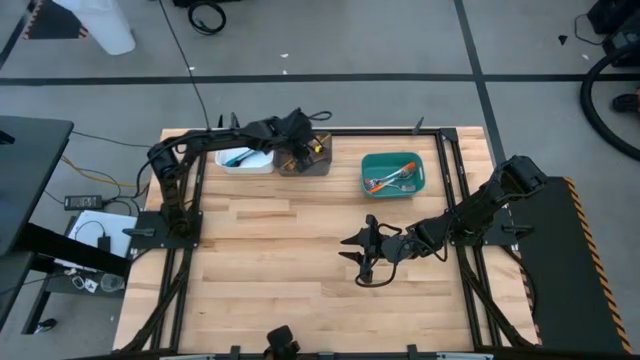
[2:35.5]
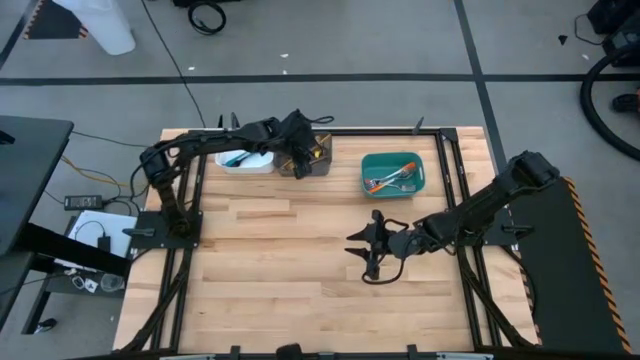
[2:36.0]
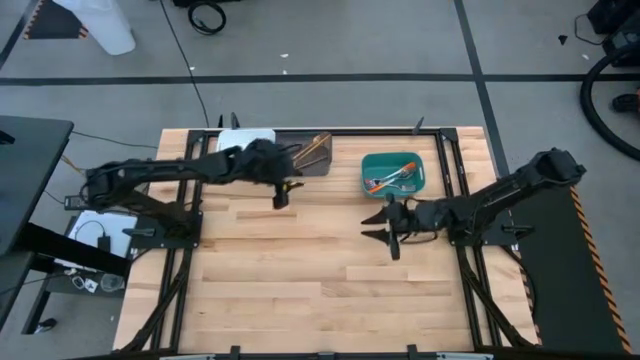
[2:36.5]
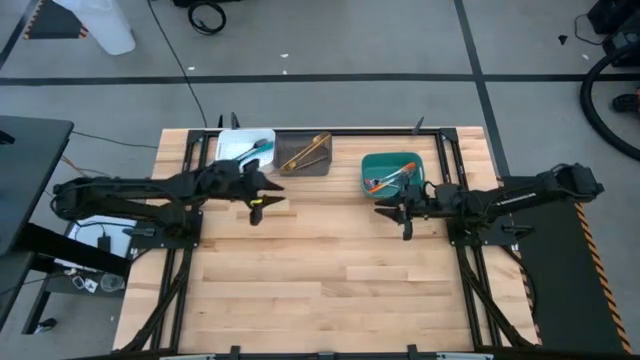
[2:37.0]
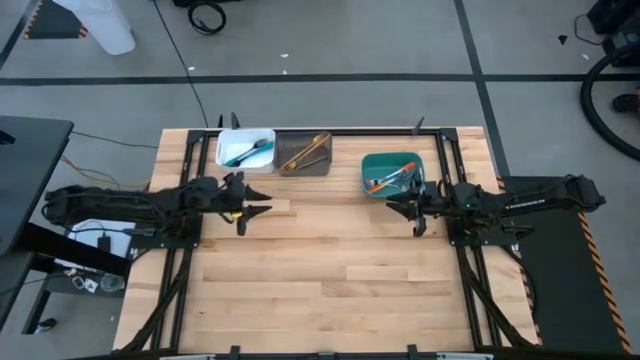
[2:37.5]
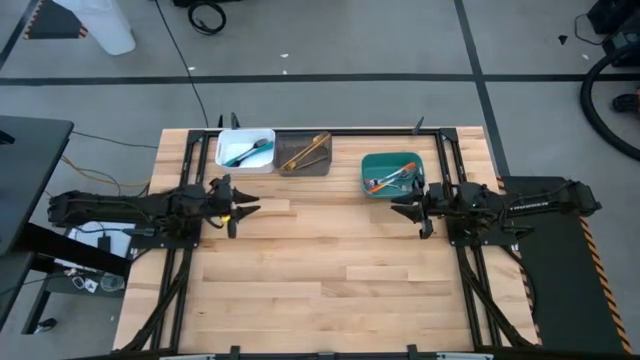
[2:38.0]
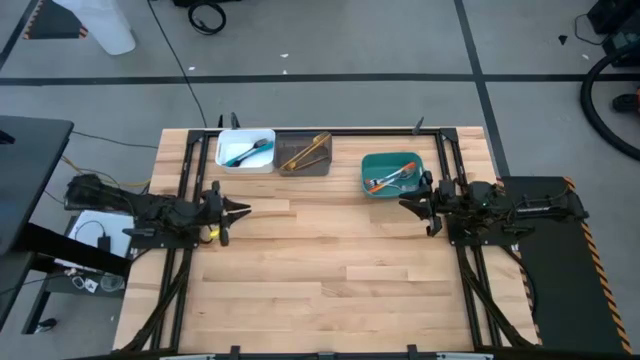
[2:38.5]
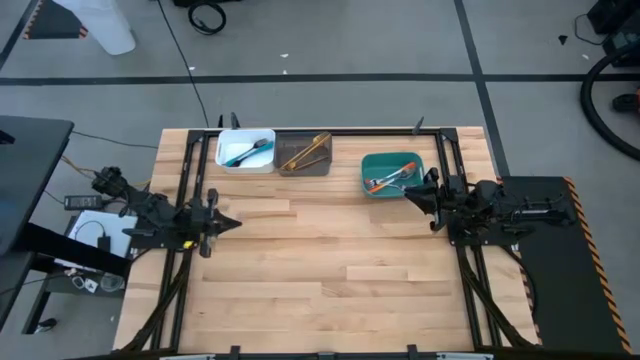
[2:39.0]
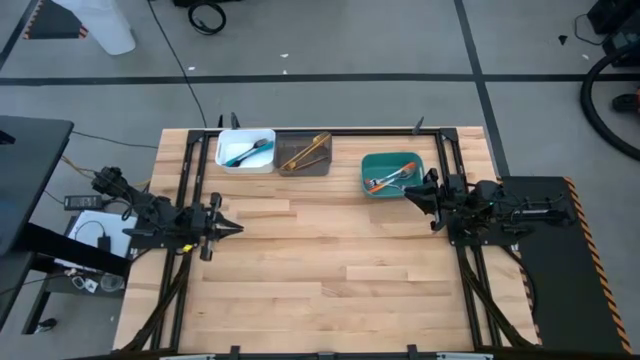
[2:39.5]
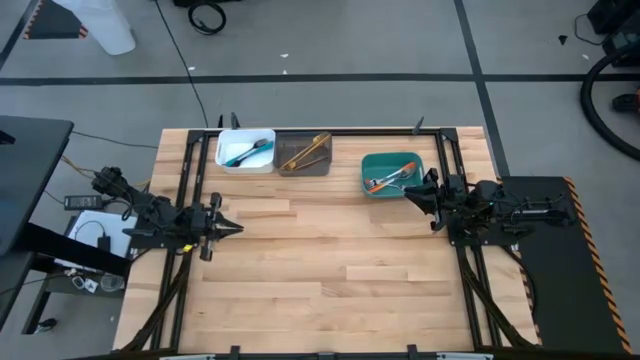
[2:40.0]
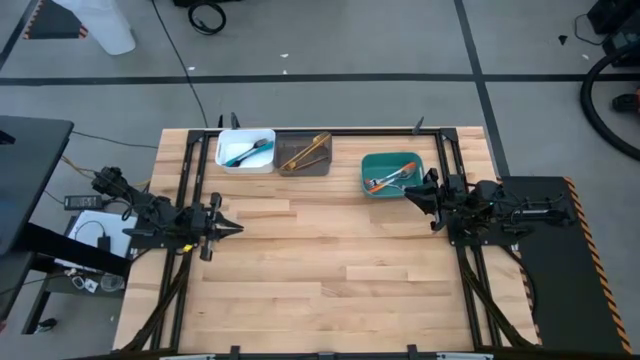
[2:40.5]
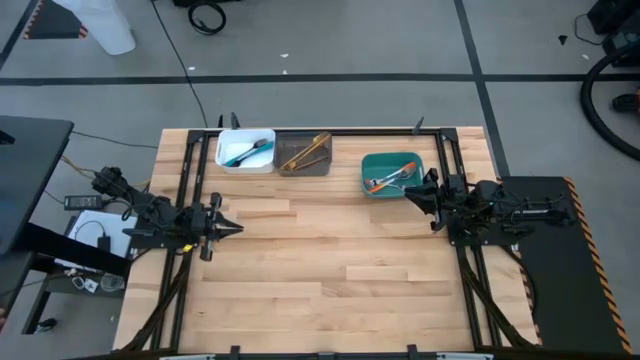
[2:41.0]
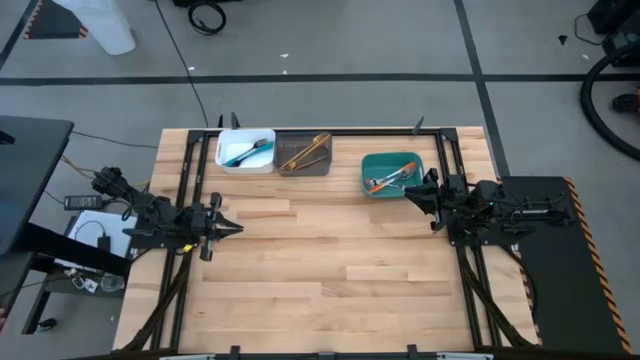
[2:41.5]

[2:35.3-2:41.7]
Task: Sort silverware by color (type)
Return to Home Position

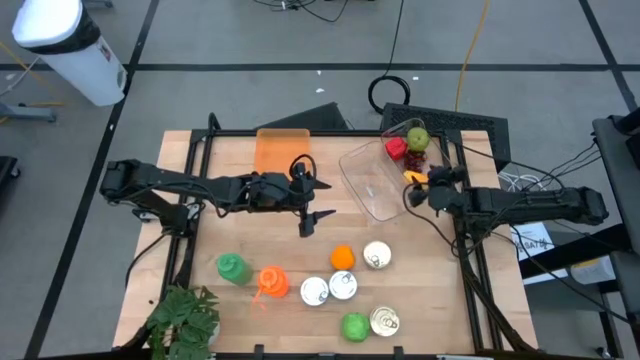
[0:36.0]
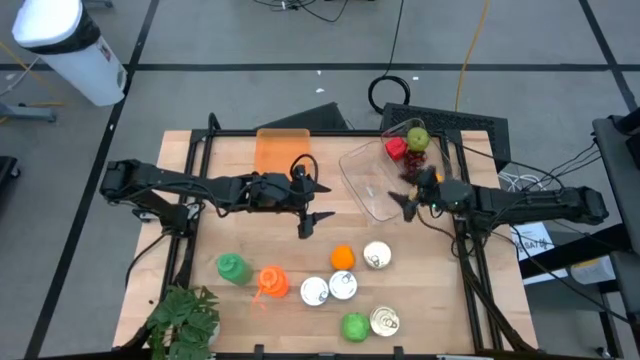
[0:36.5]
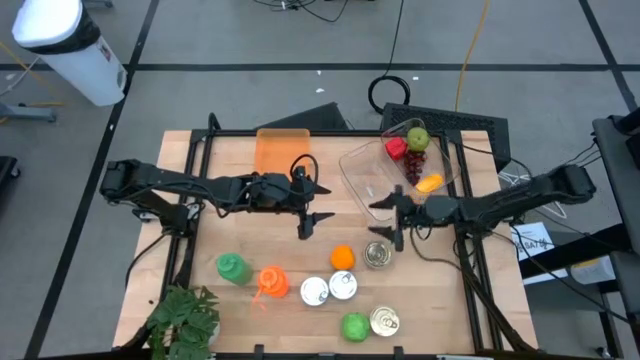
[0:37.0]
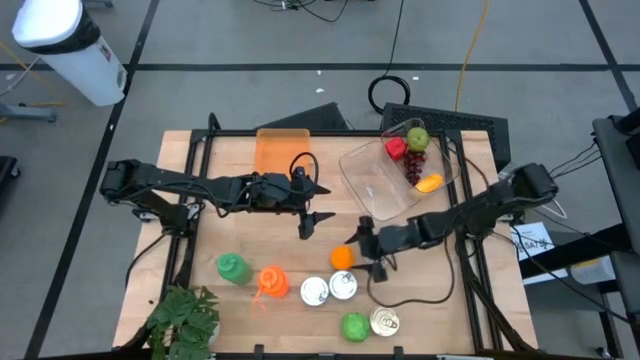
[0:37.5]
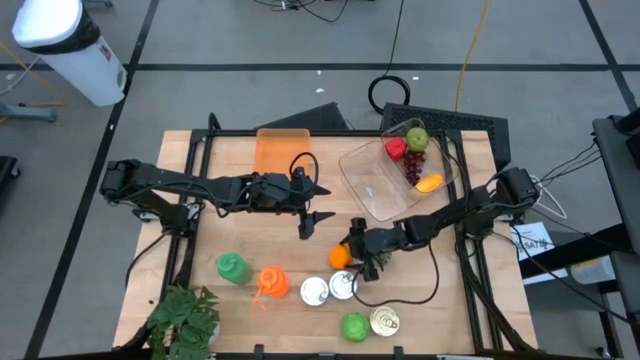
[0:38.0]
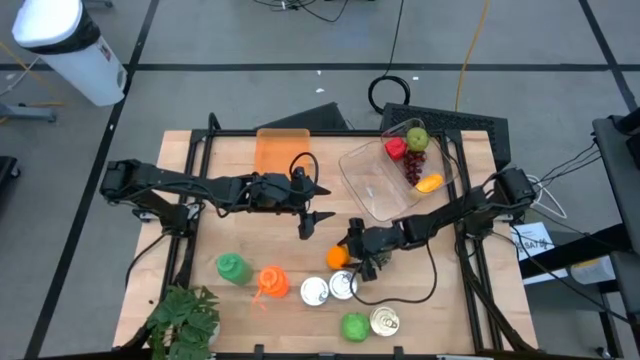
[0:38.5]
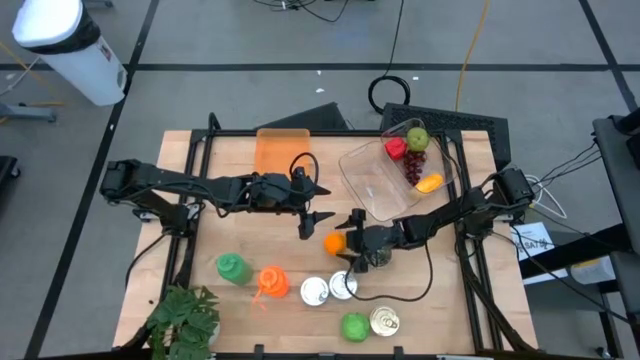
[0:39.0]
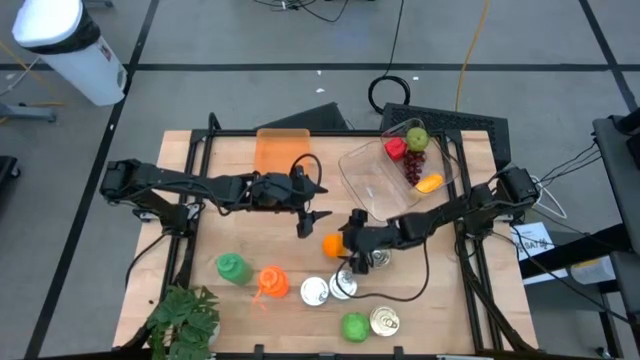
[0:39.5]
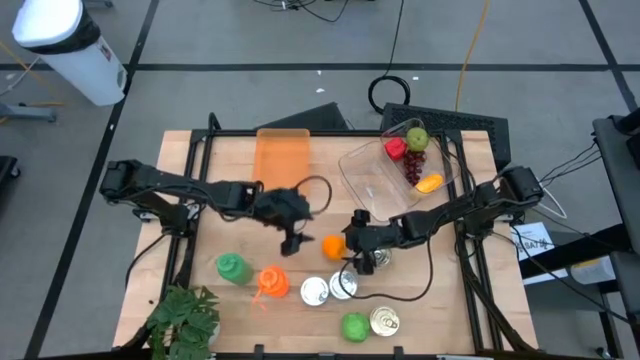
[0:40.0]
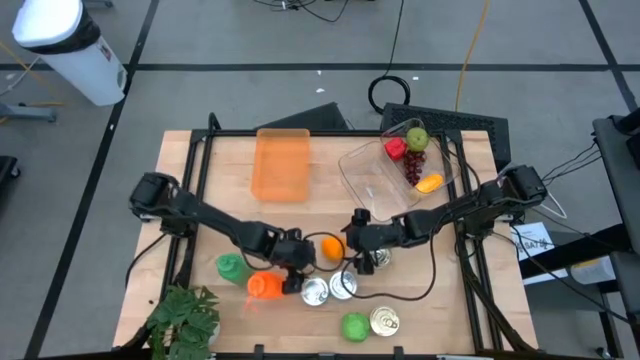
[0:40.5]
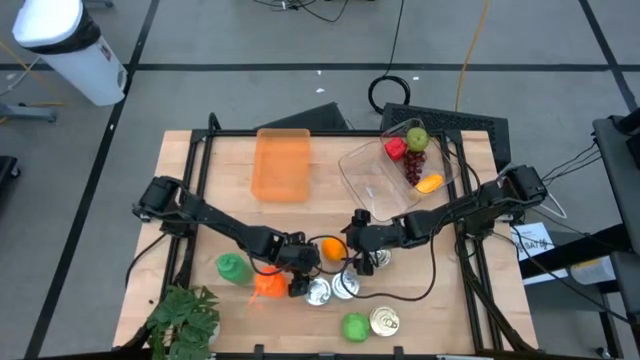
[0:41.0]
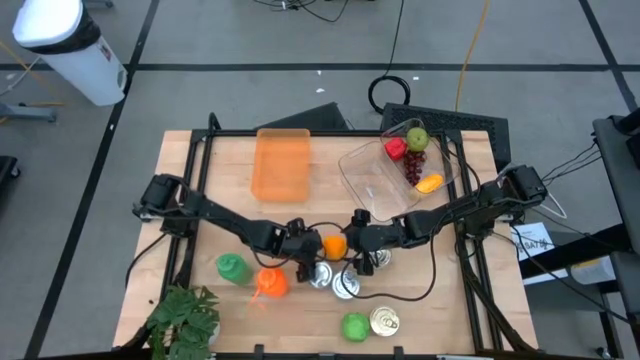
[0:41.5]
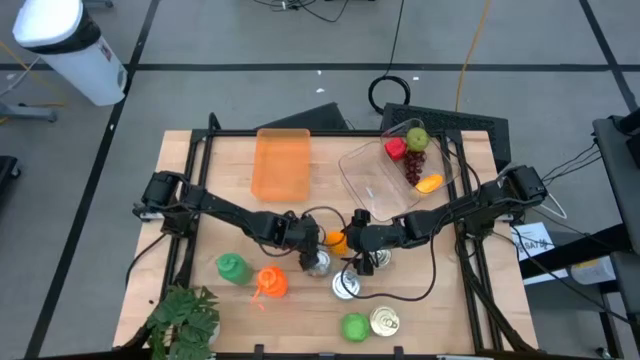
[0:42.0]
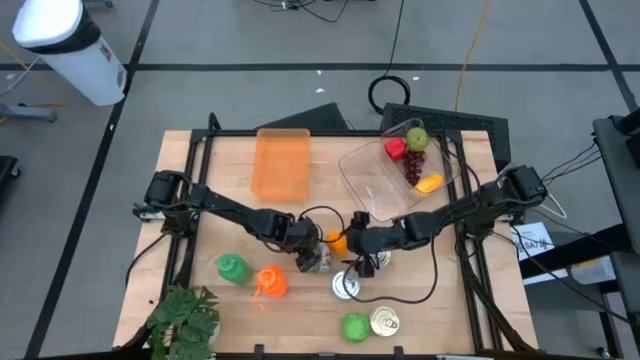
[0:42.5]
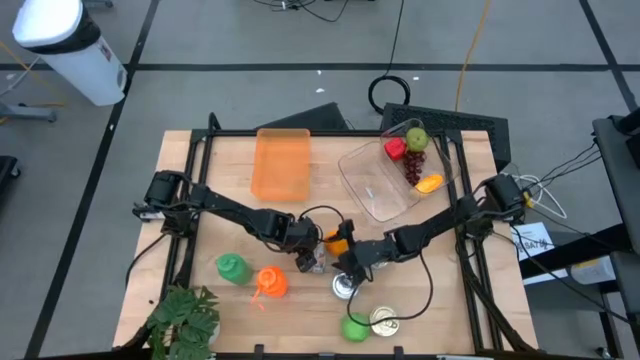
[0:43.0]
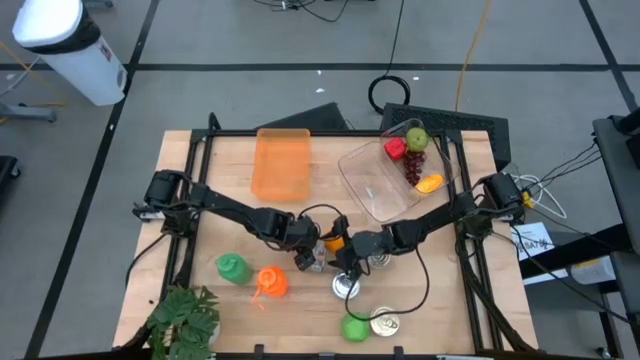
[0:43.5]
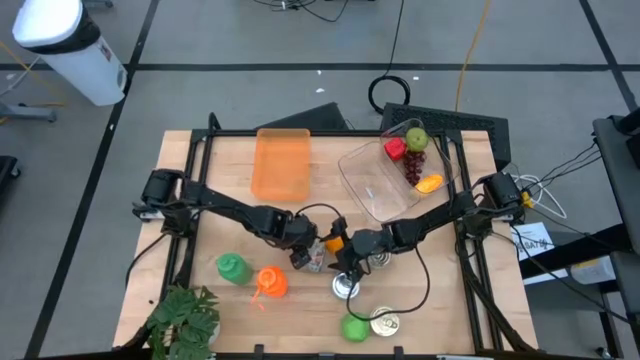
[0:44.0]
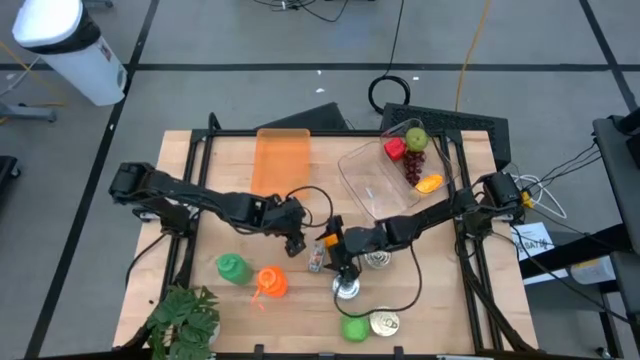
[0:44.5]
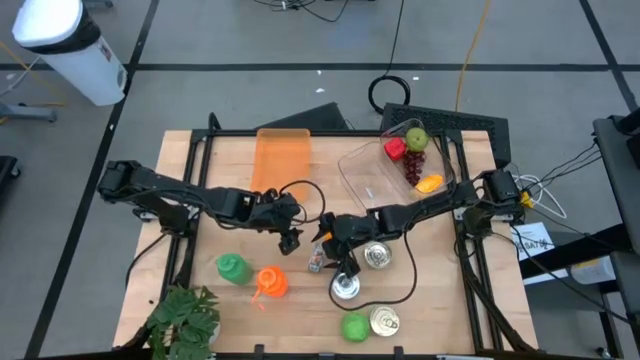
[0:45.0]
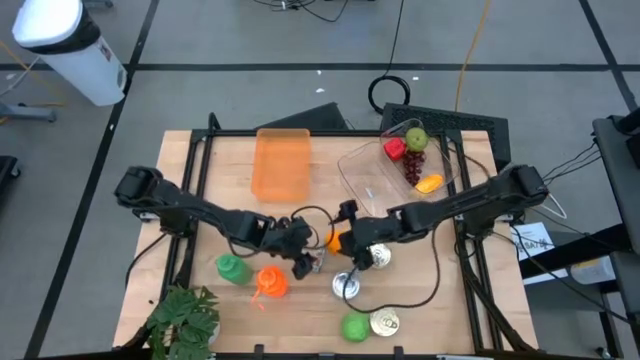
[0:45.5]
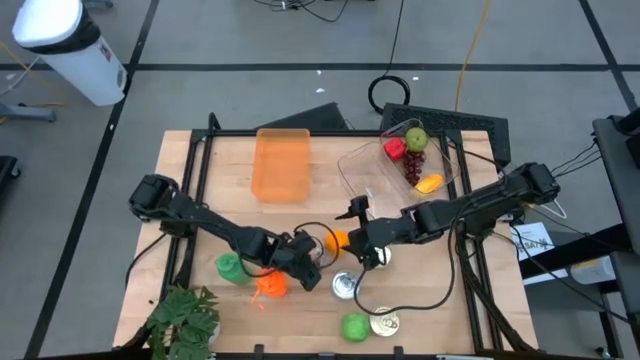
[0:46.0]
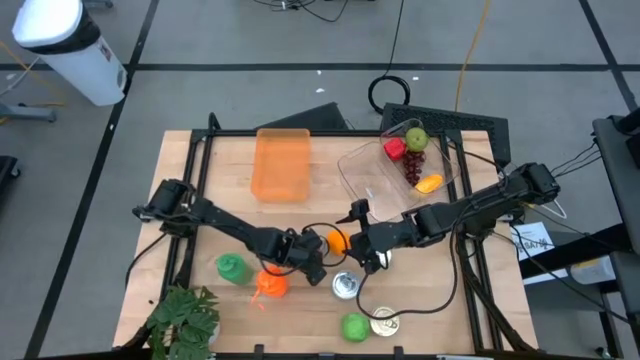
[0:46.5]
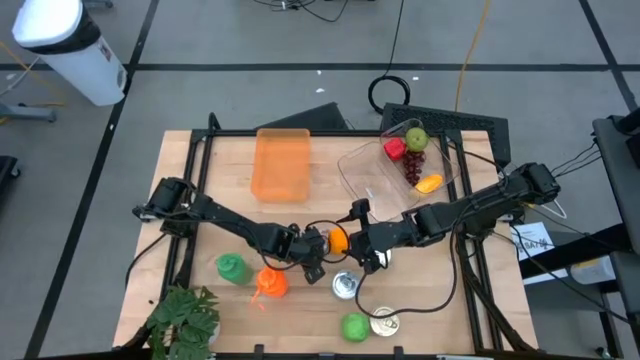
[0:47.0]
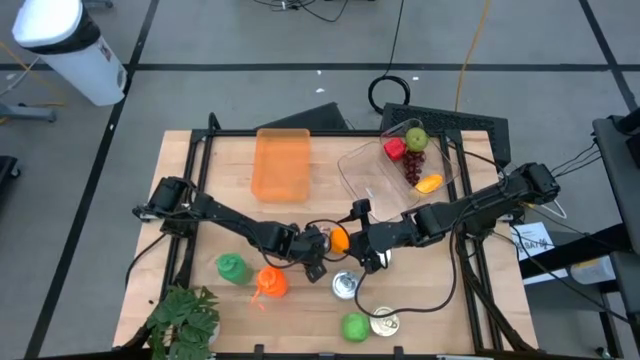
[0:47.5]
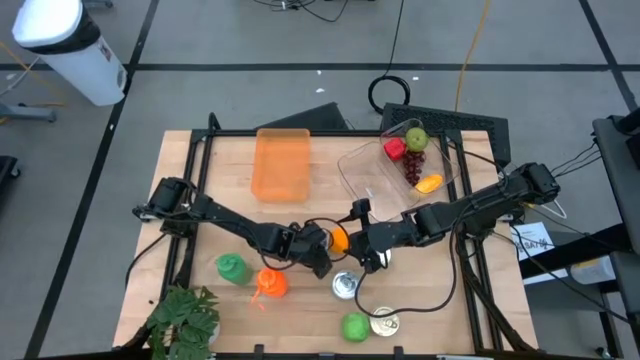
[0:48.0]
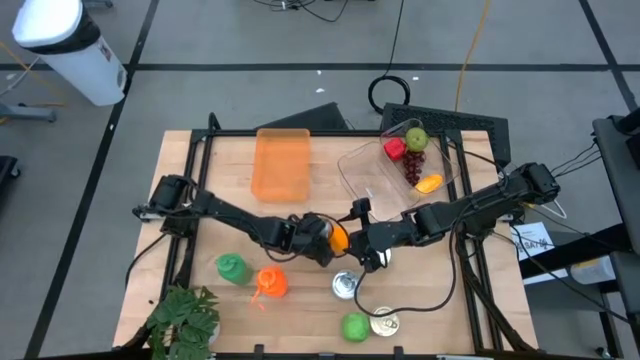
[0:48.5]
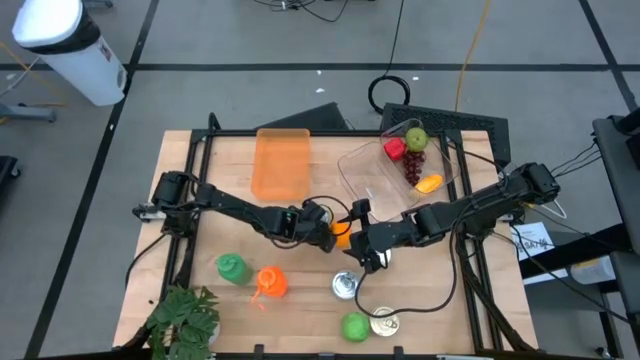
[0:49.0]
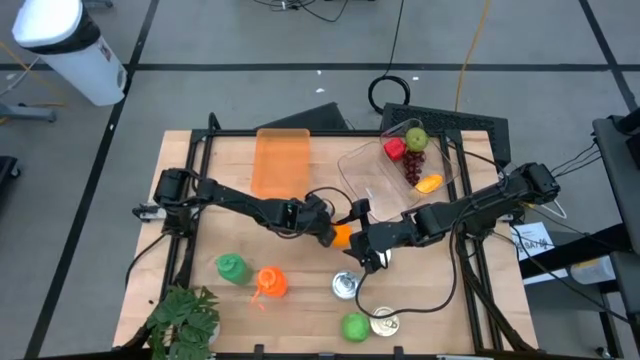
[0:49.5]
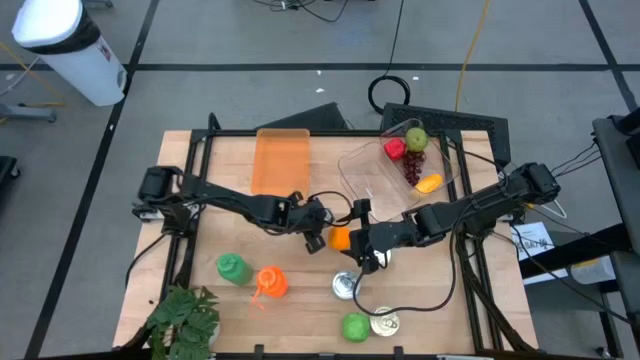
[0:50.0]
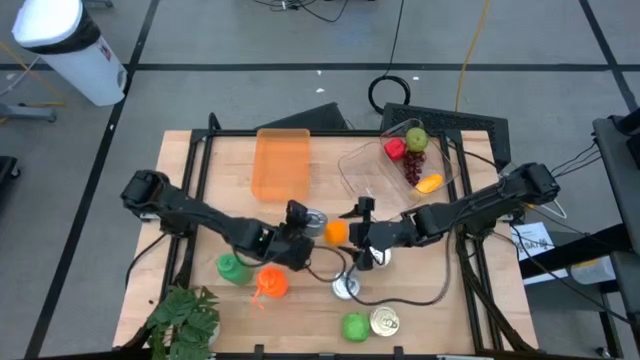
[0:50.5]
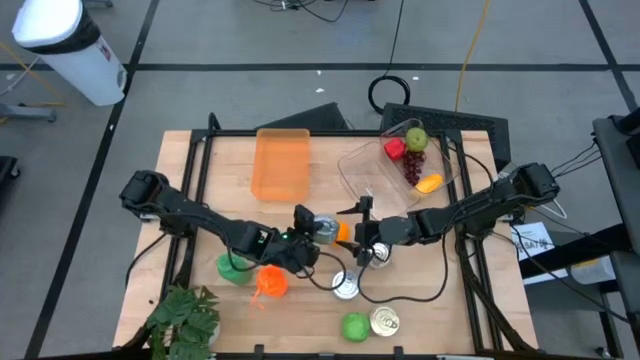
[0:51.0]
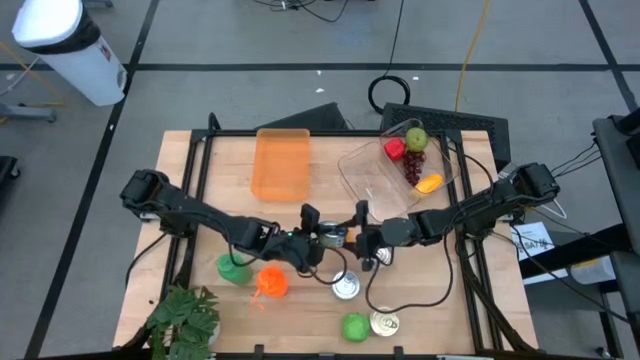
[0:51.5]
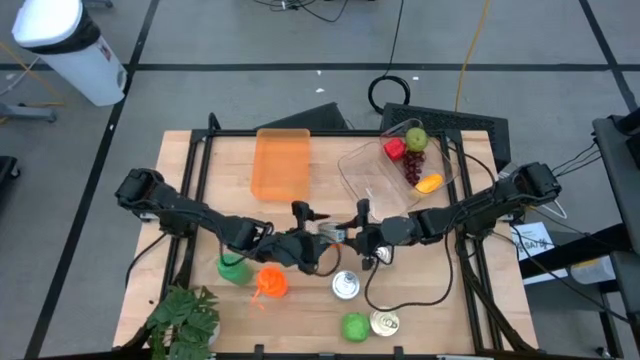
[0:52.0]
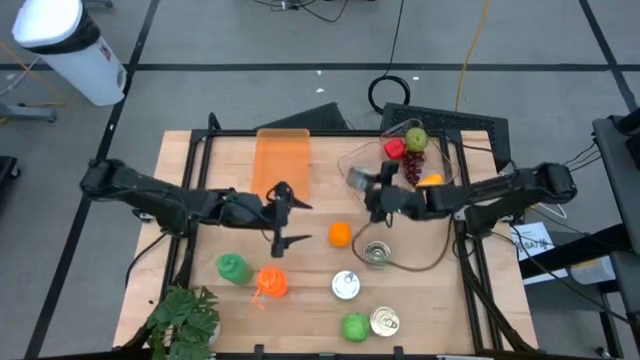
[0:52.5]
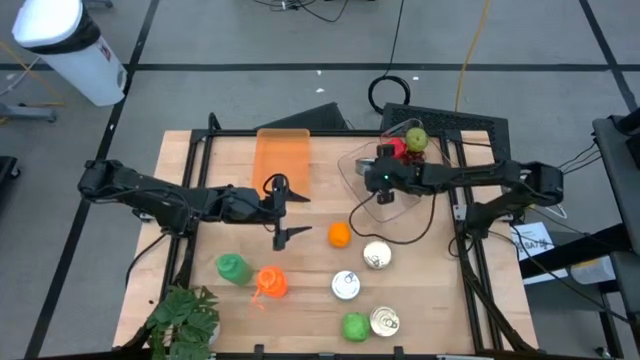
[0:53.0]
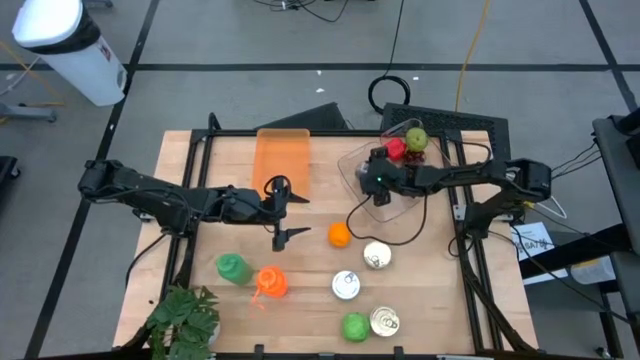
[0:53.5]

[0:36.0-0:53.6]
Task: Pick & Place Food Item
Put the green tuna can into the left transparent bin
